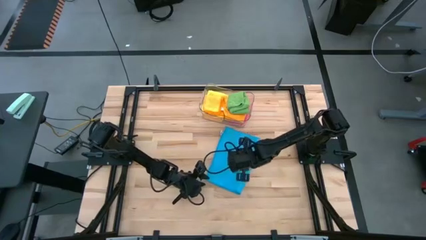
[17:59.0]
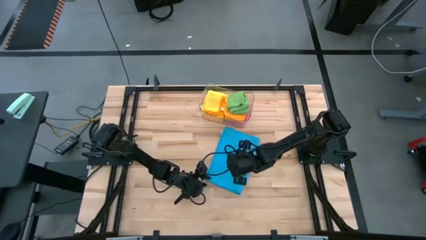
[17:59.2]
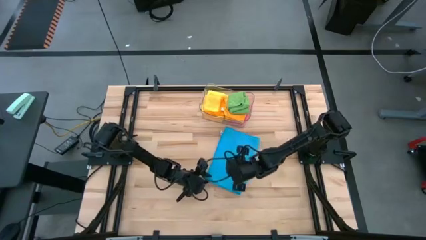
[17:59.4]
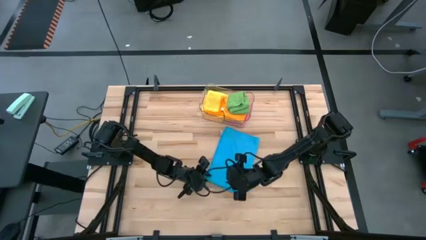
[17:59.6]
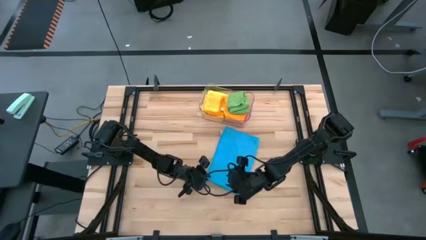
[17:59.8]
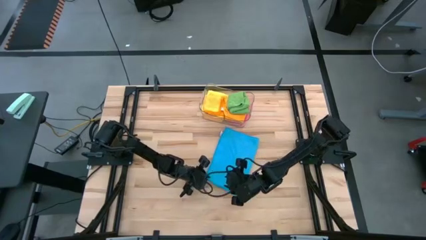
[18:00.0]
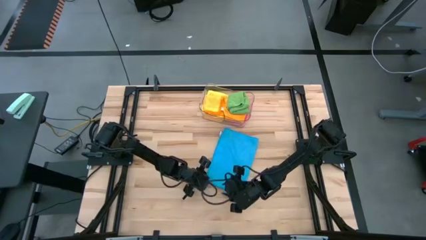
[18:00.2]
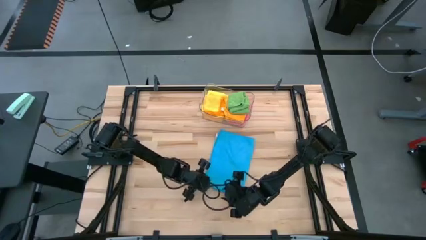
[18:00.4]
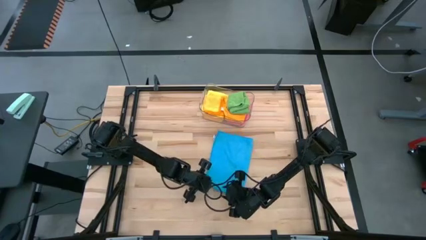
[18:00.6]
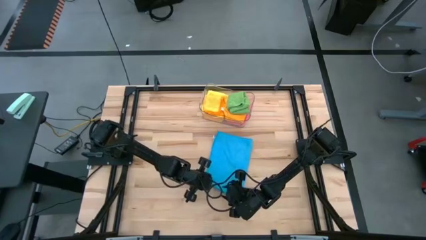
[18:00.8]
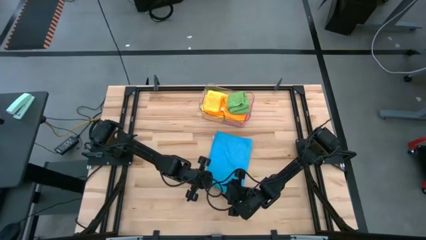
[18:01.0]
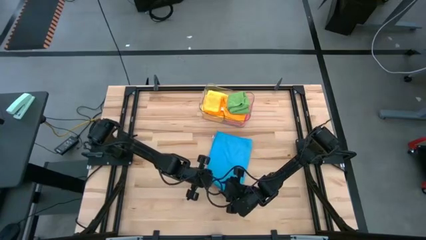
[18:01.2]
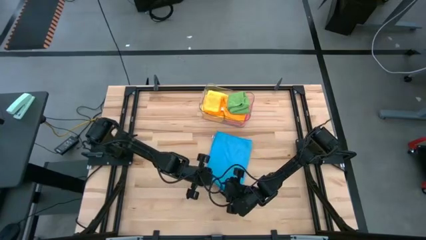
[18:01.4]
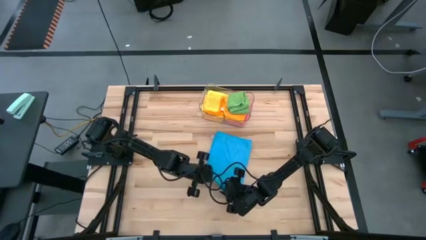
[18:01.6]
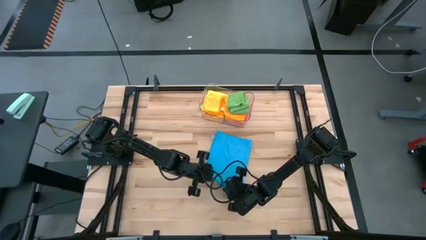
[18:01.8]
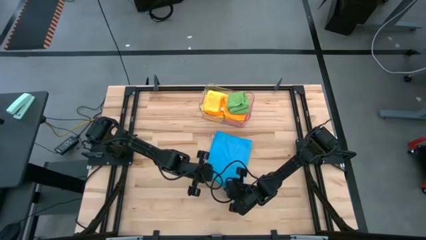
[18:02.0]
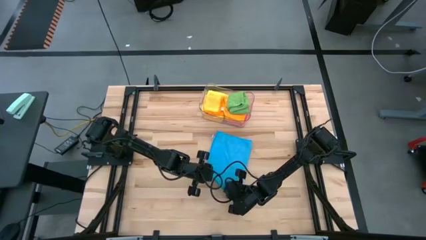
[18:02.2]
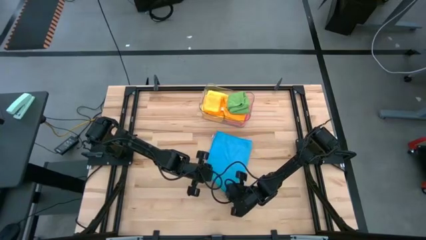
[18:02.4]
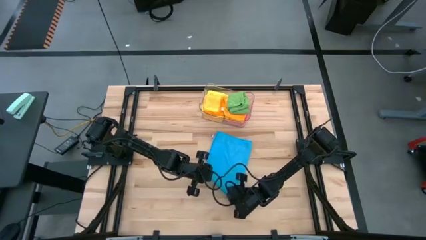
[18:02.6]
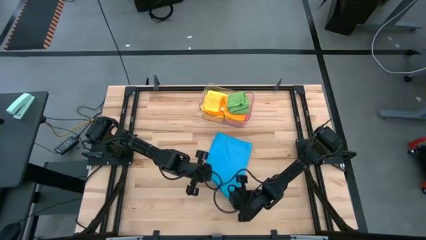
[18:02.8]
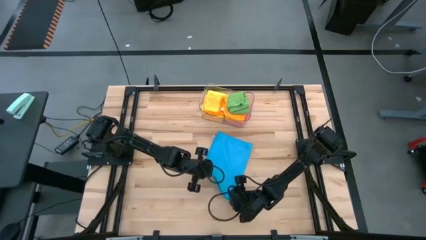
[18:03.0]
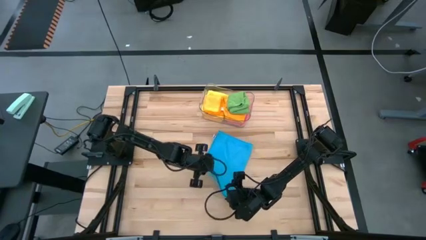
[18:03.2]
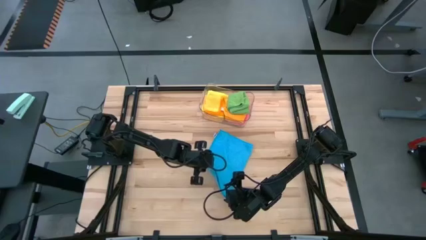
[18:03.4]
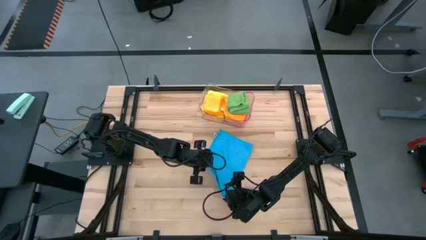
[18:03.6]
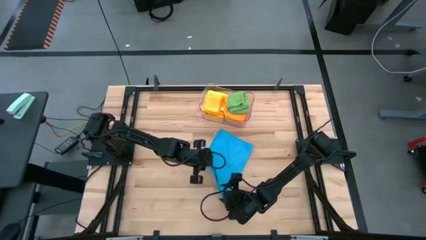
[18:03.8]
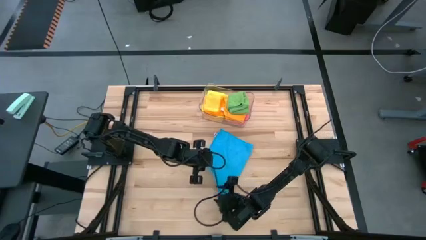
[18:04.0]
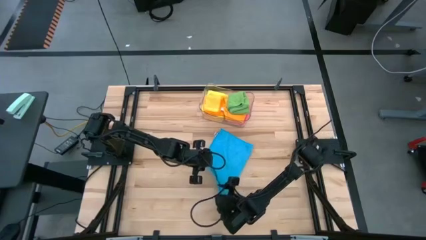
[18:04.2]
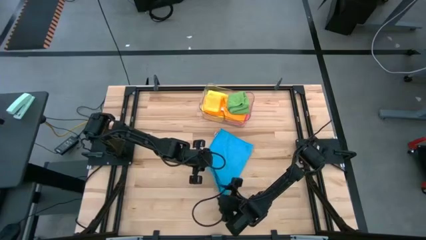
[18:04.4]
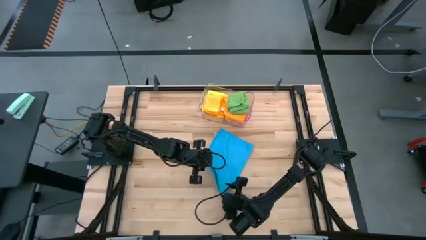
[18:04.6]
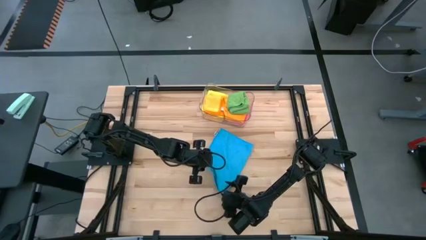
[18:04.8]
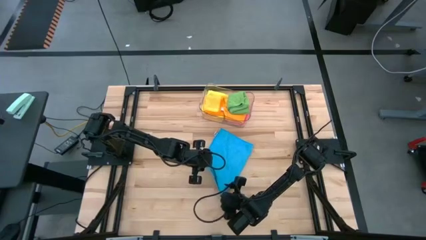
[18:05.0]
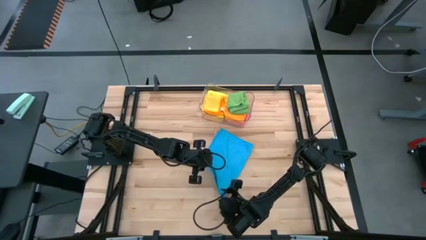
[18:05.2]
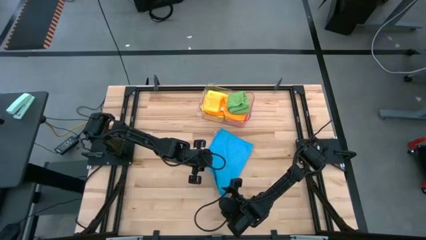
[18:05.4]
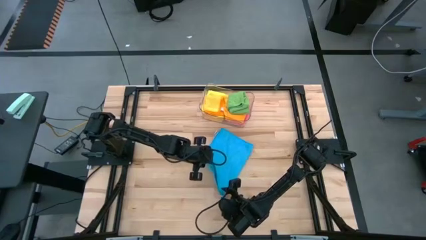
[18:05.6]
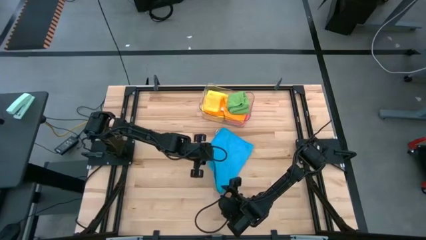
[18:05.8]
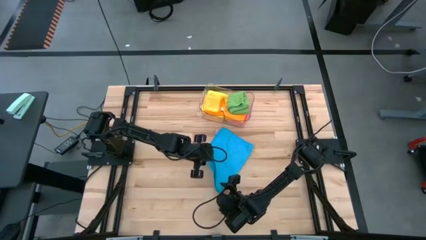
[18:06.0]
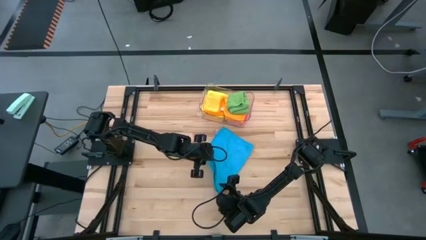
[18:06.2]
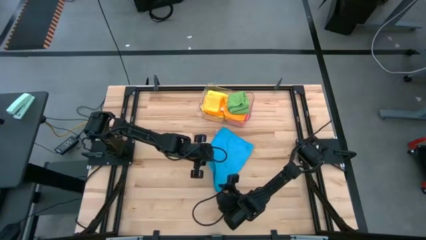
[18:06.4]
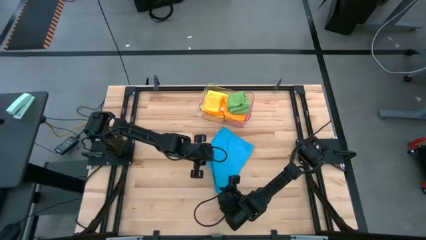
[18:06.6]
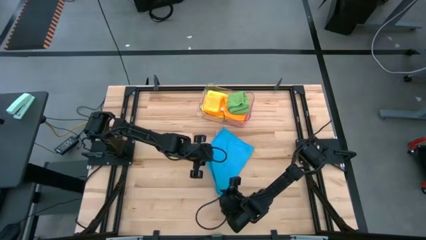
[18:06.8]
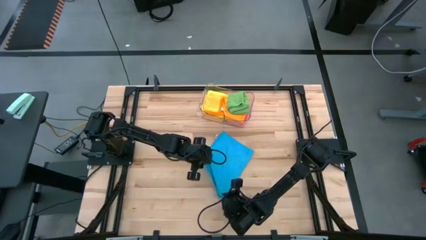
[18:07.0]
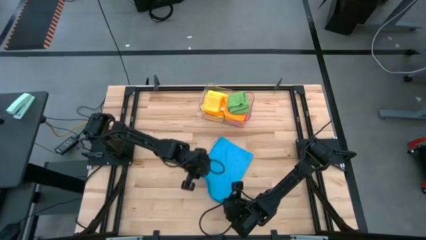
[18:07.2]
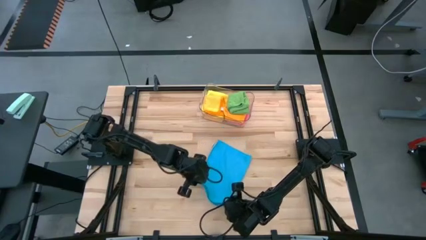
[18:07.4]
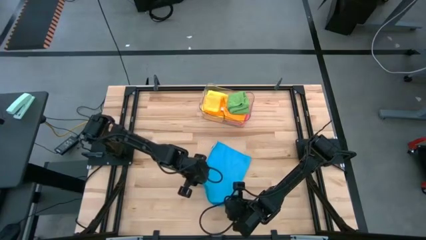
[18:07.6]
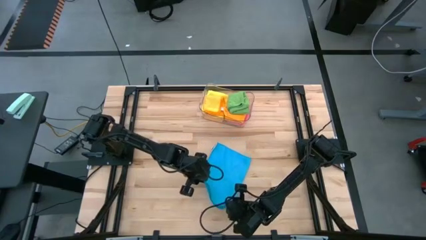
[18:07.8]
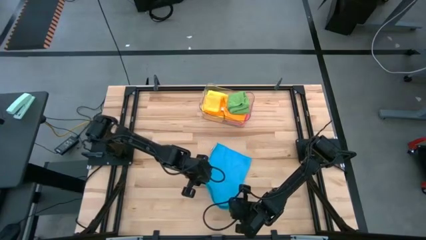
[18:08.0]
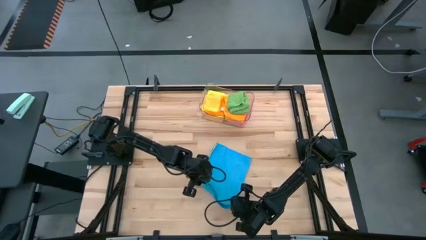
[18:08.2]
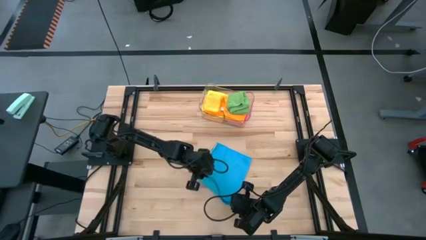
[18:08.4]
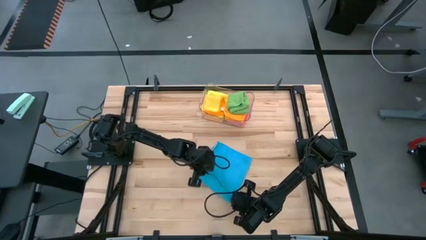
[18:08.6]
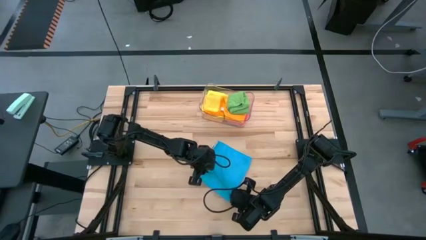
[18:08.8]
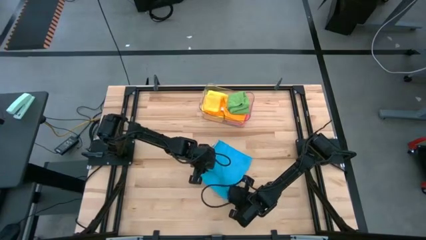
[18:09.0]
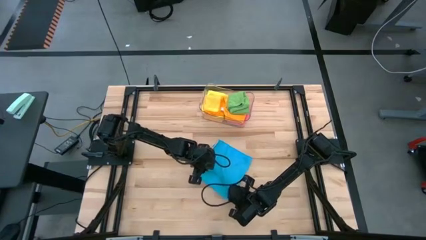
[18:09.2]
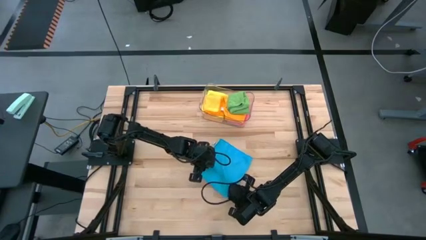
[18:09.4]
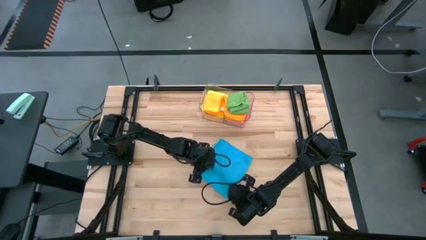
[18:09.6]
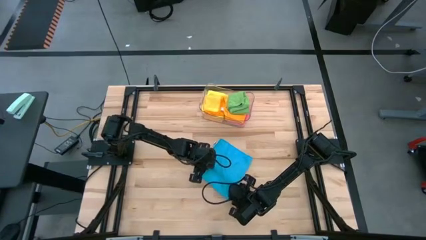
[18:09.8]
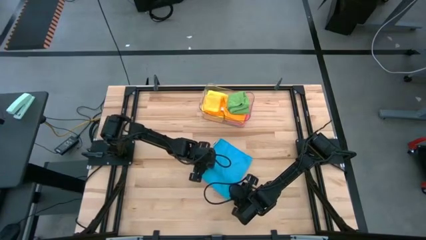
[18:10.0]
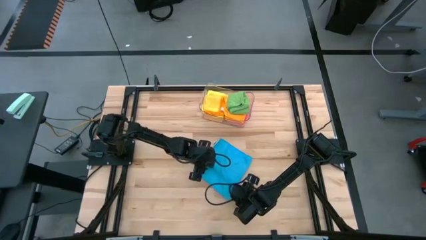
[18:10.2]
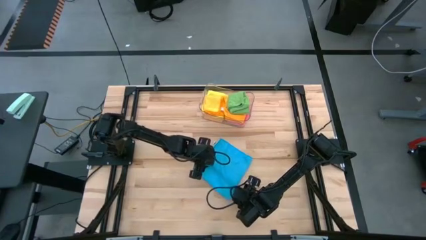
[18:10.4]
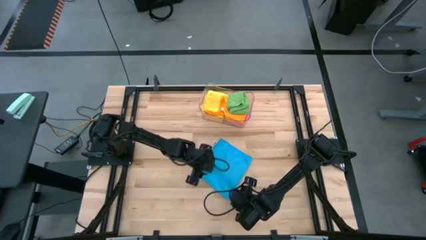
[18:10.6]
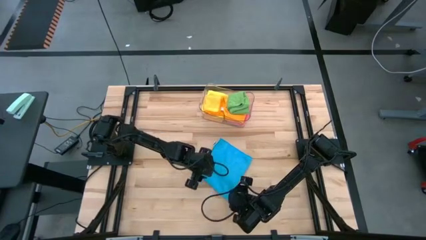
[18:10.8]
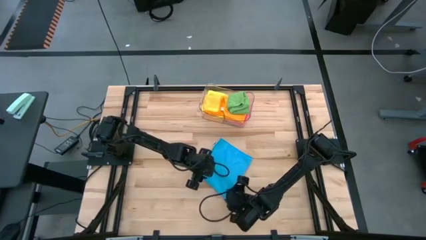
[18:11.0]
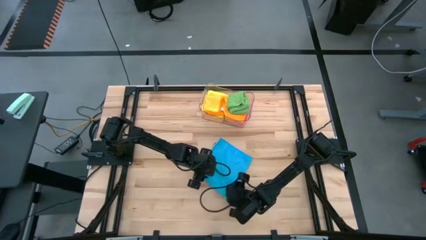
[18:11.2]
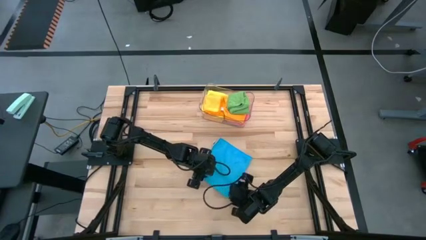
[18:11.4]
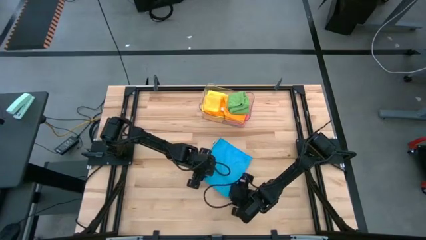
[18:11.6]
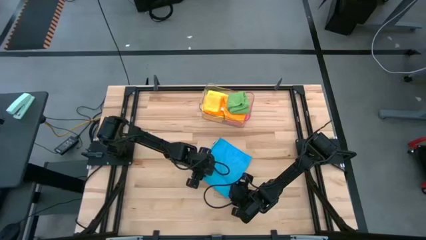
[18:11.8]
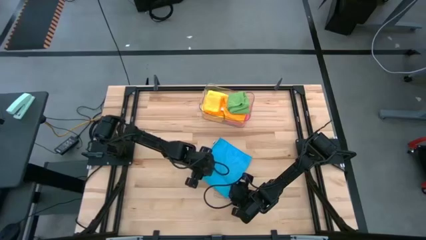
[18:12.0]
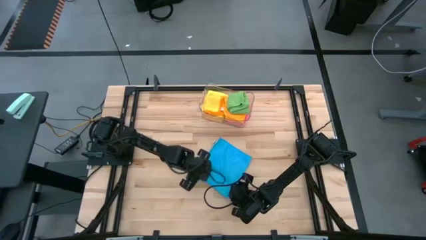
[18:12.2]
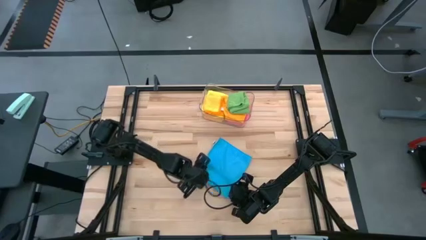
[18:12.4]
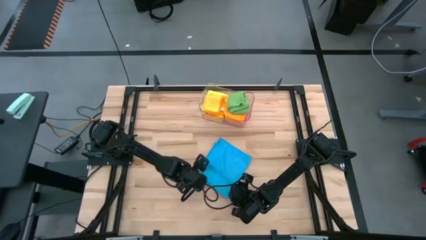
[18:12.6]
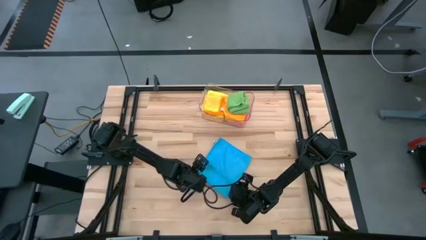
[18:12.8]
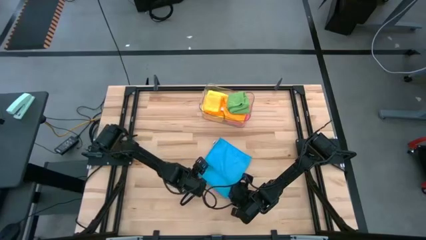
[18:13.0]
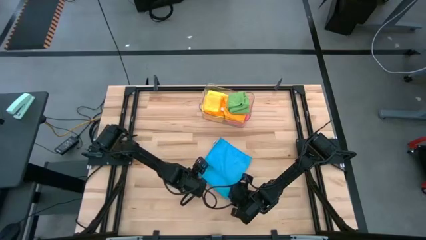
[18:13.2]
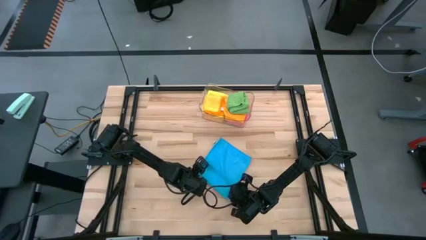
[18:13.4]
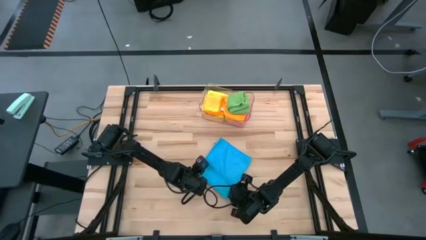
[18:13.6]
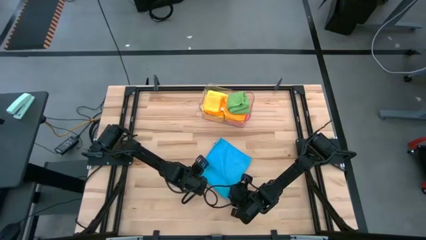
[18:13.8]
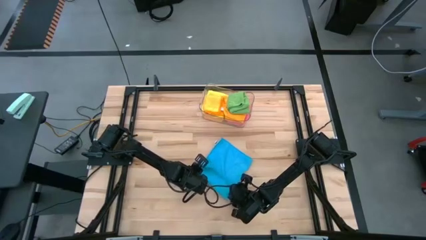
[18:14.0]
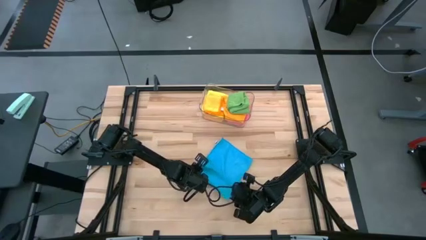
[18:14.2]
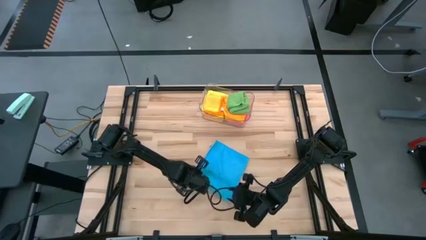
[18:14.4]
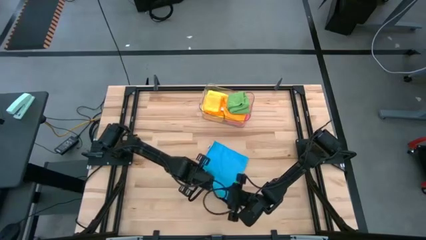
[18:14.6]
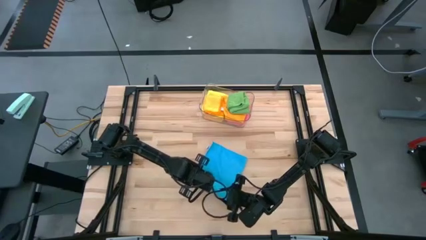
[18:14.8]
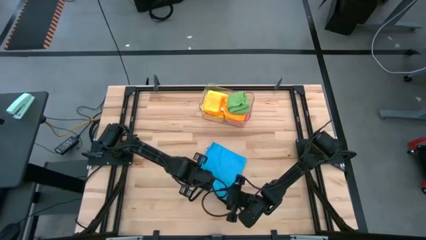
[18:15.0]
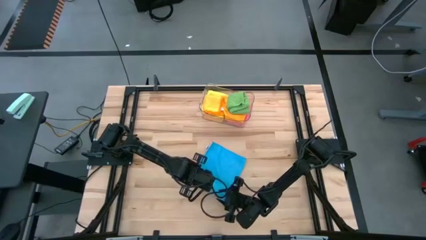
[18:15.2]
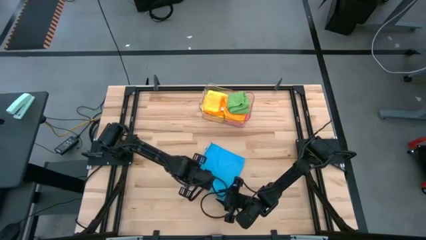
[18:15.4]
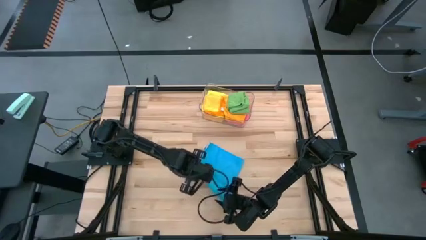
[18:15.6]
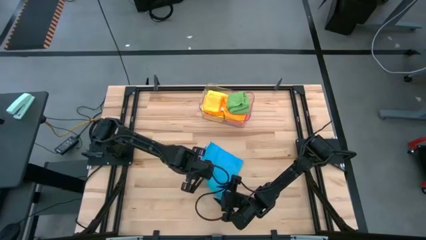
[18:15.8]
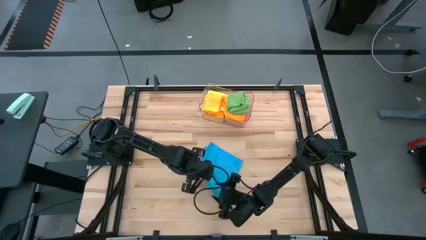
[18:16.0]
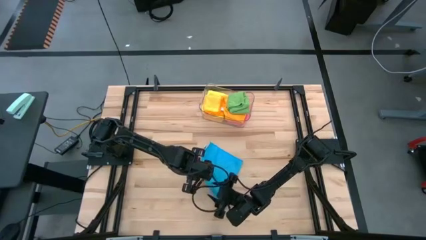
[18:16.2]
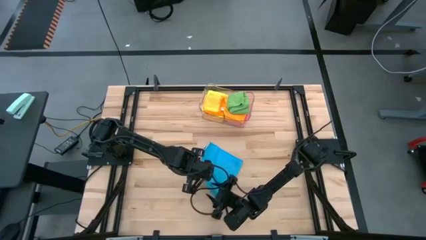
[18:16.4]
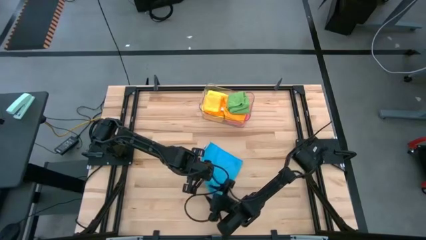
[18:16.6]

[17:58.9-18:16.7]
Task: Fold microfiber towels
Fold the blue microfiber cloth
